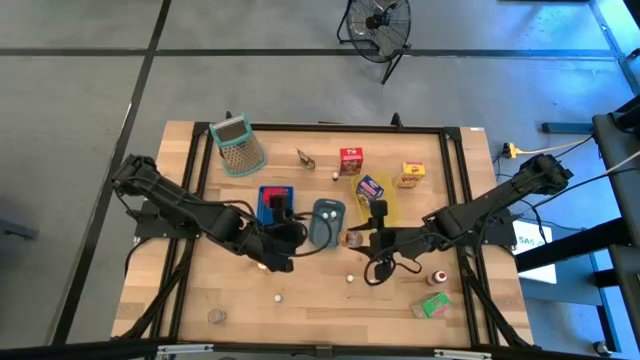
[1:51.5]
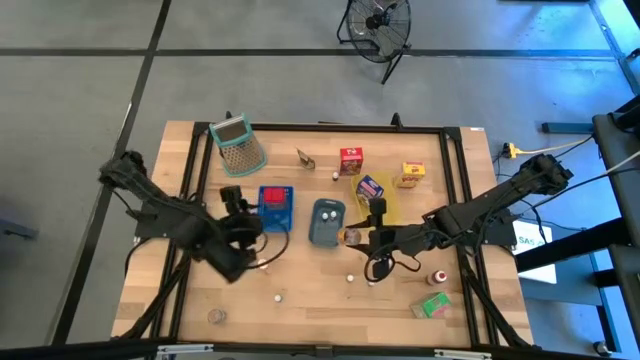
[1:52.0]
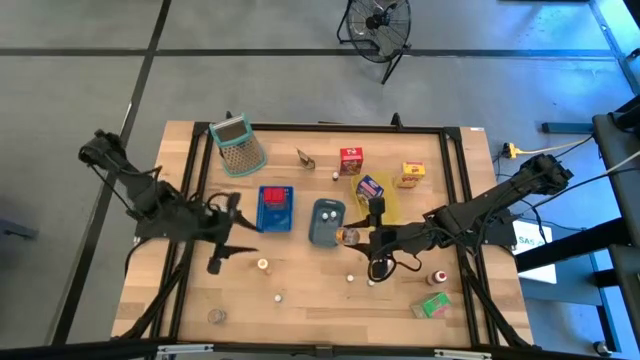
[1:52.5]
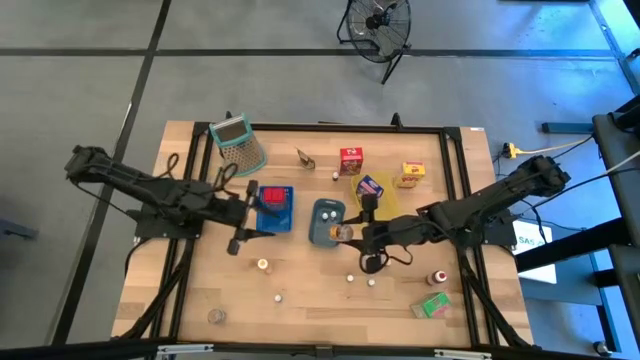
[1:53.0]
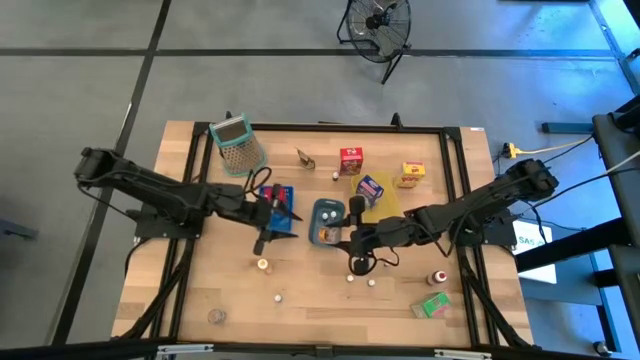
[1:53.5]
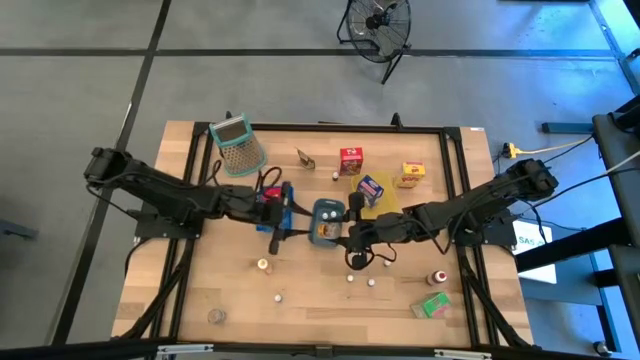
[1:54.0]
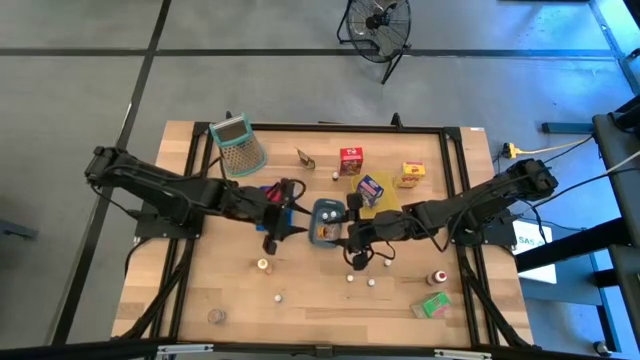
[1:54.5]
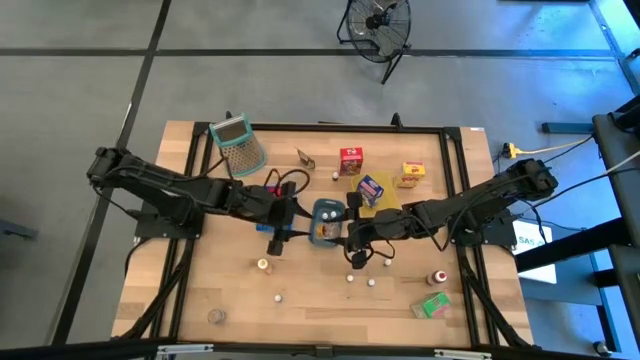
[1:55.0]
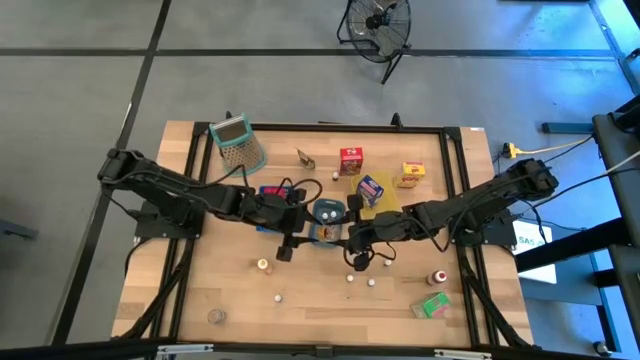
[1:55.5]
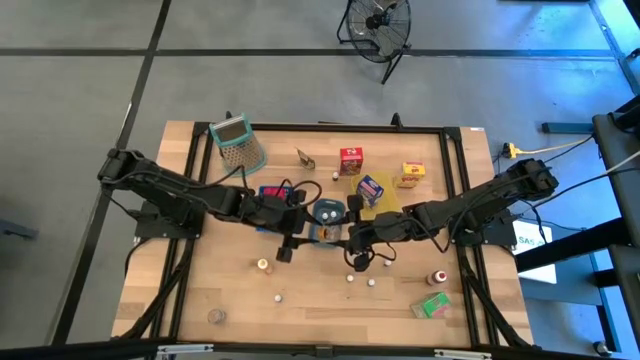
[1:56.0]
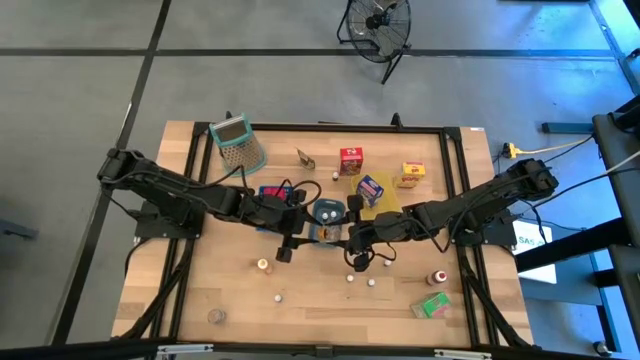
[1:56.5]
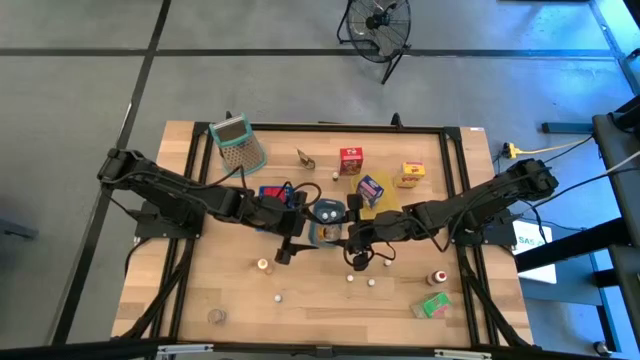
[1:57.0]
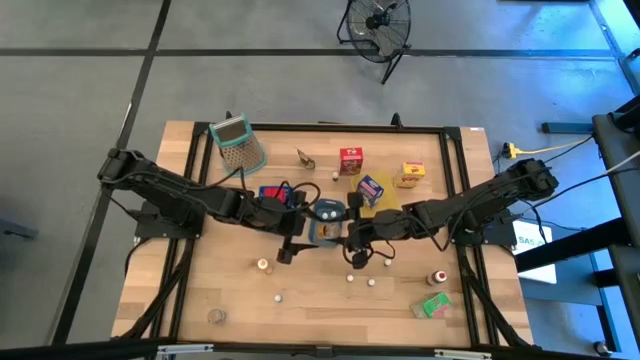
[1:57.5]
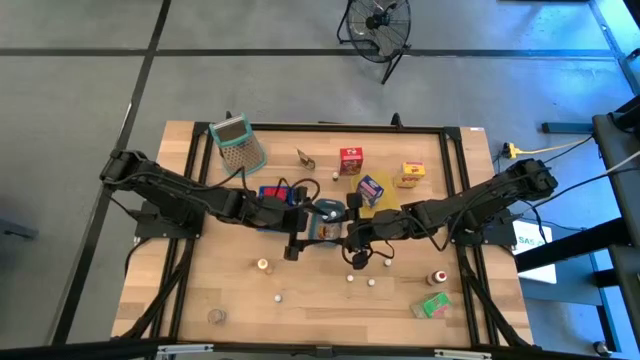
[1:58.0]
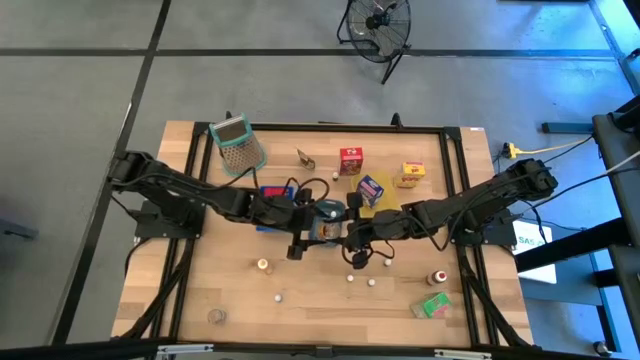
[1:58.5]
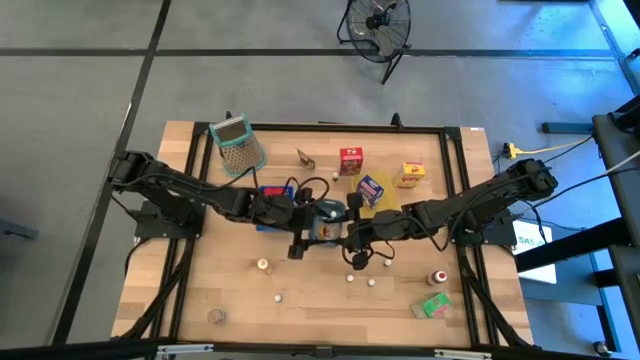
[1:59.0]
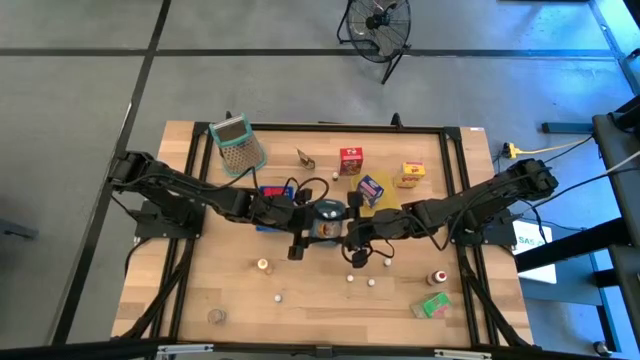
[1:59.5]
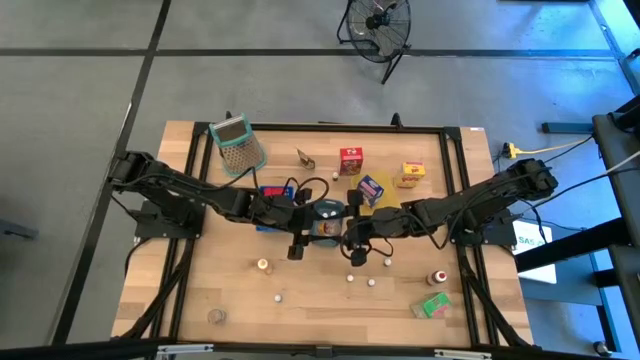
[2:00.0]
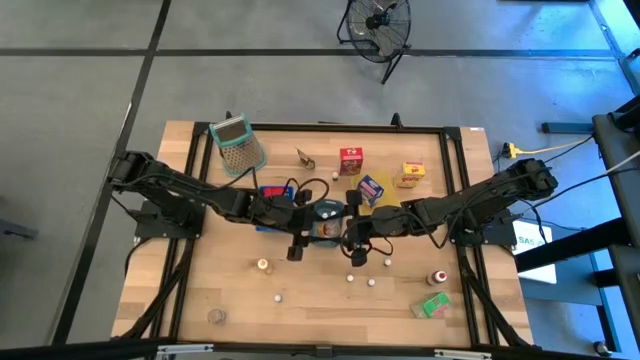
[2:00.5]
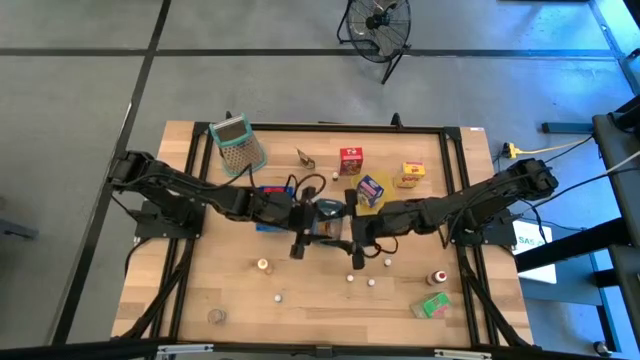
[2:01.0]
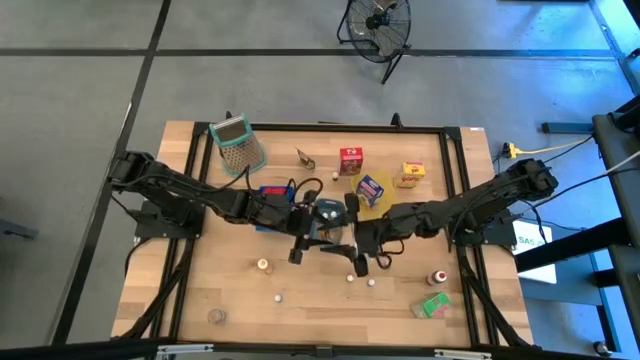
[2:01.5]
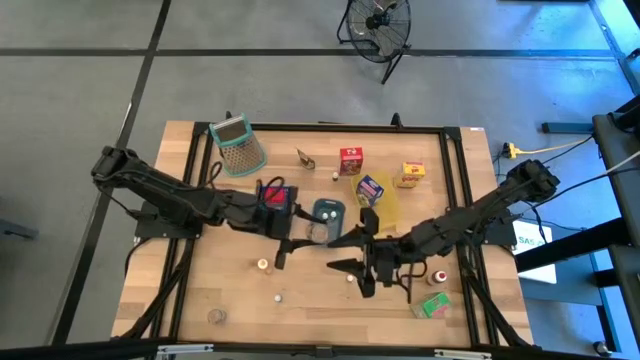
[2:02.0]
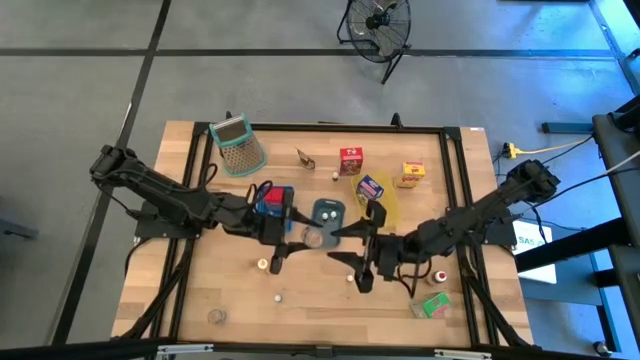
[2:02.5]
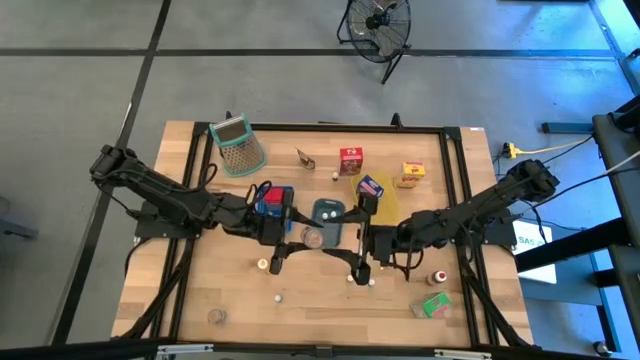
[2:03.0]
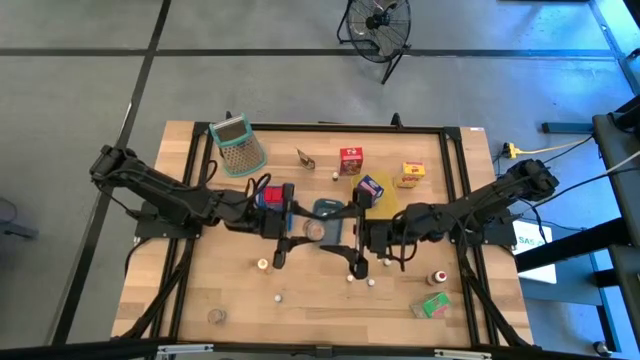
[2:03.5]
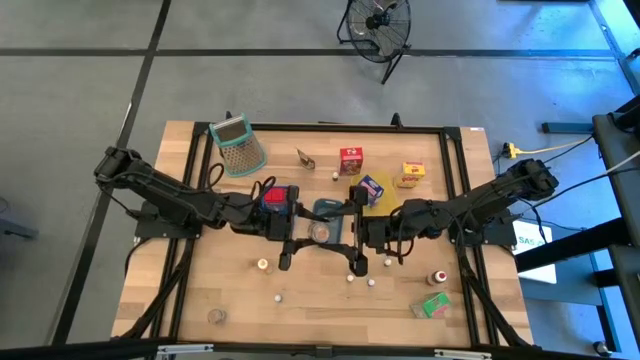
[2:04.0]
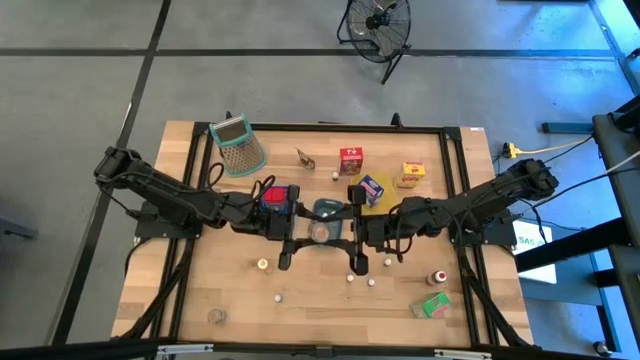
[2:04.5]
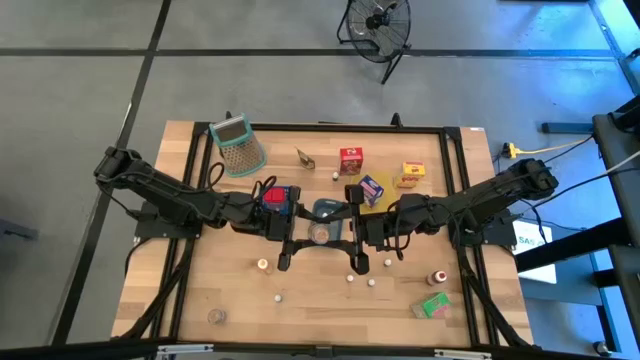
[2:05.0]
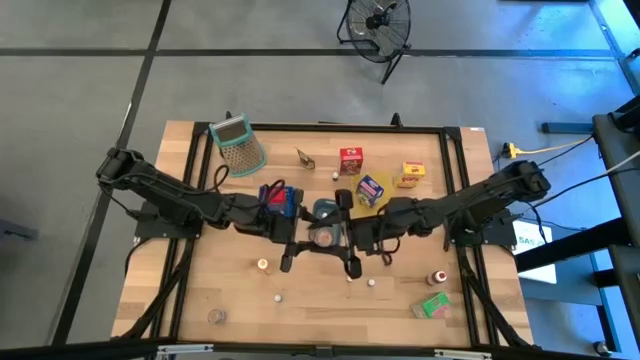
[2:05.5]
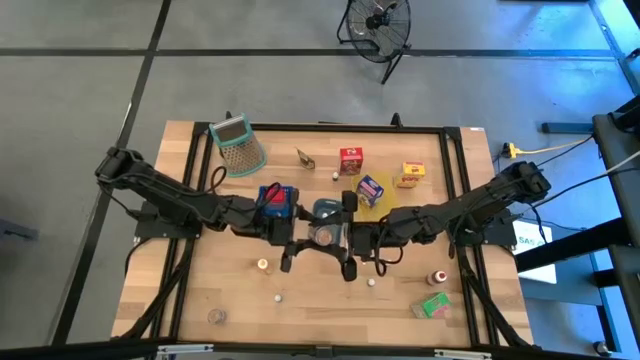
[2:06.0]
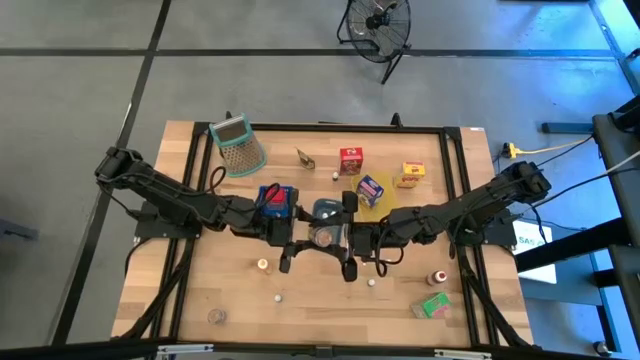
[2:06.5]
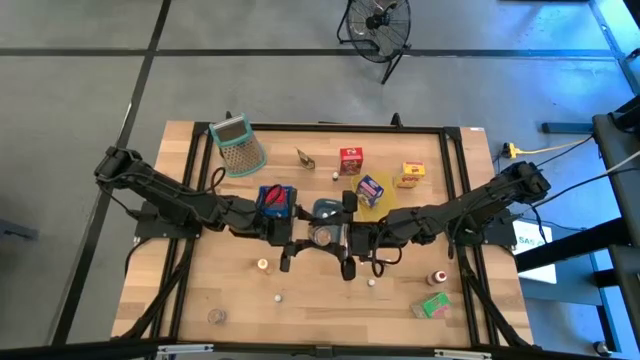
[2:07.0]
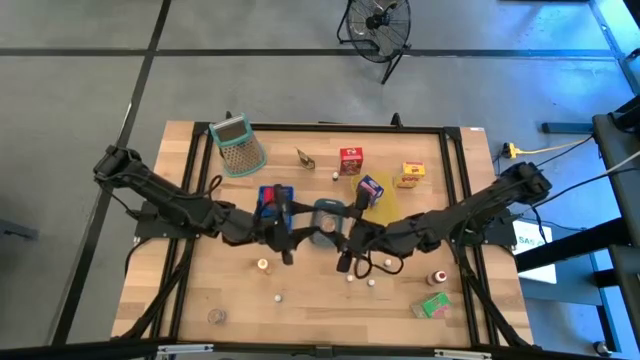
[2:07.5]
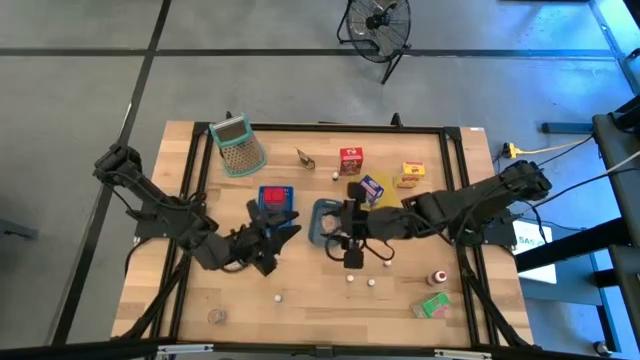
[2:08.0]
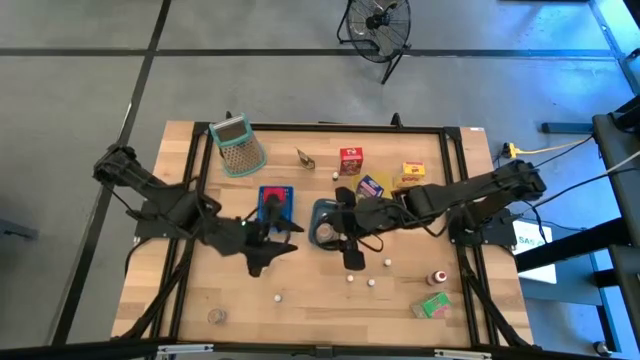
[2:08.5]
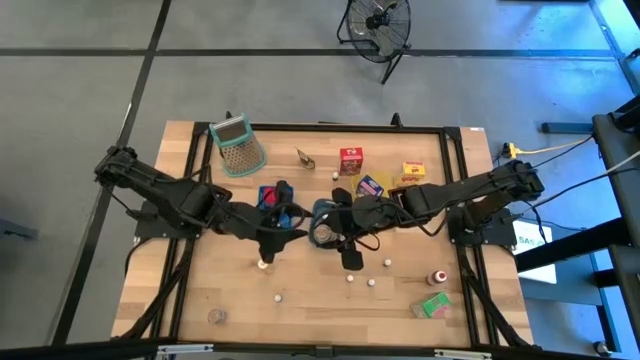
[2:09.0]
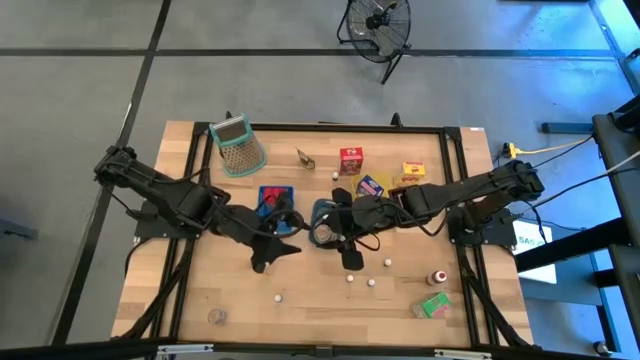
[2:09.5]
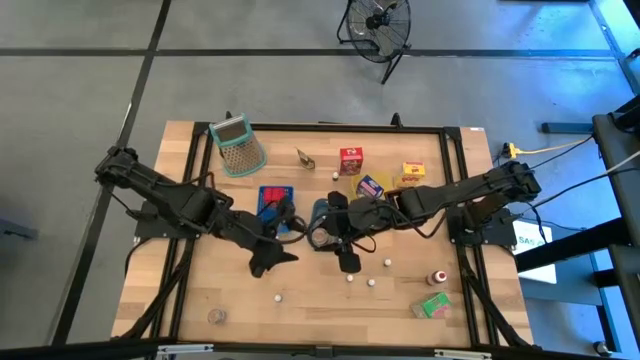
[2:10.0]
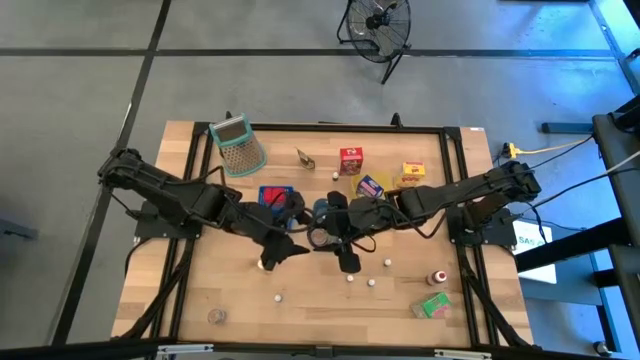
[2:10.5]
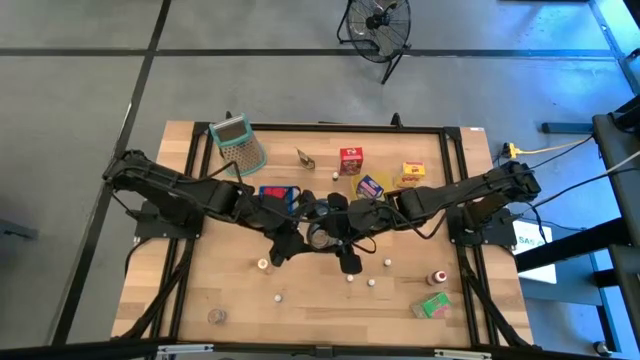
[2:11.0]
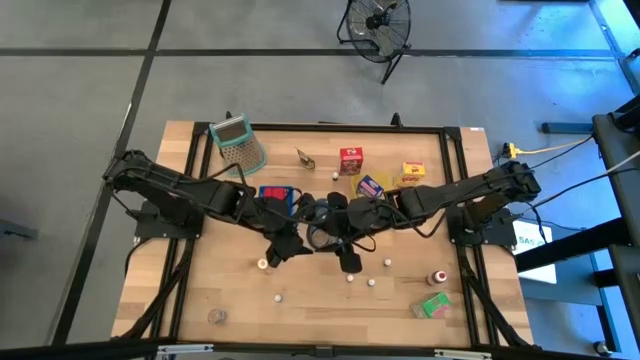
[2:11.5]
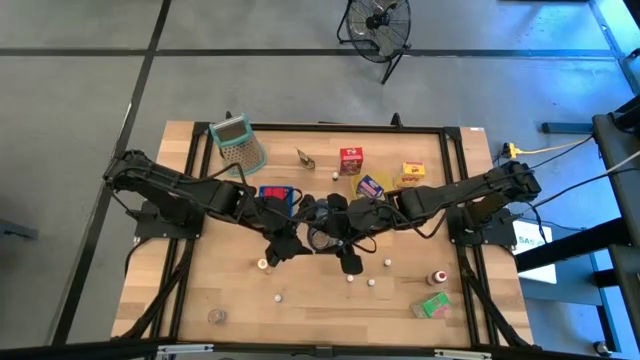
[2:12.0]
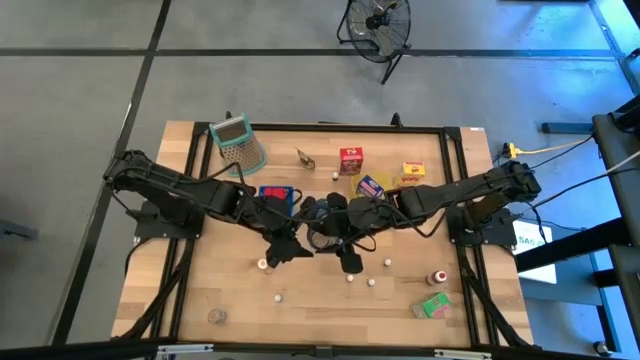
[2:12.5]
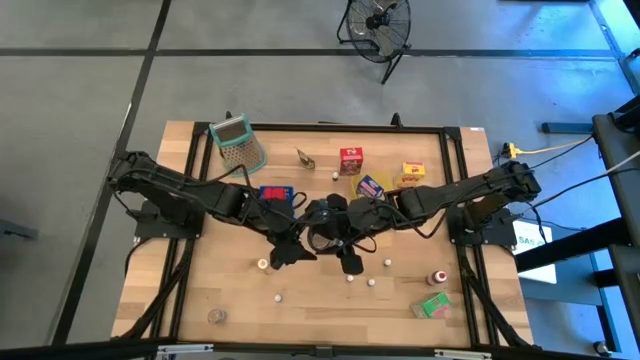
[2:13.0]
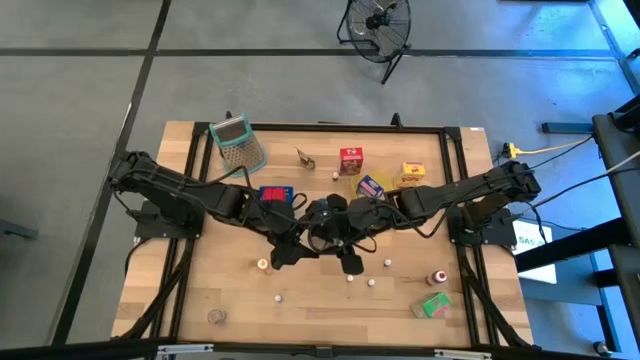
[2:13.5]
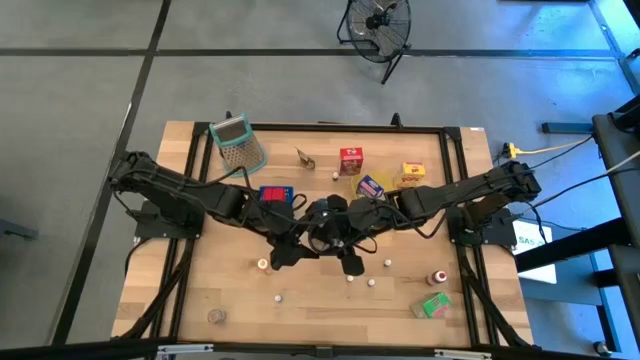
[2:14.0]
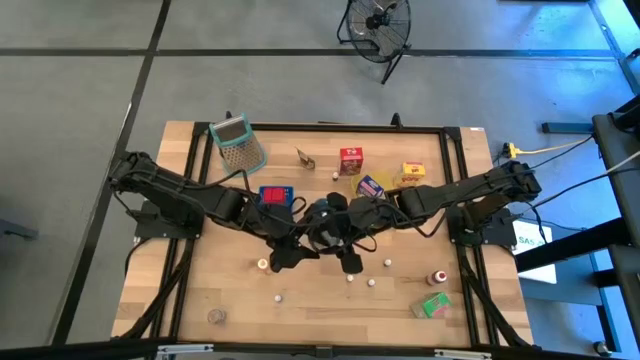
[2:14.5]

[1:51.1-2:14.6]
Task: Pick & Place Kitchen Items
Put the right brown seasoning bottle into the blue bin
